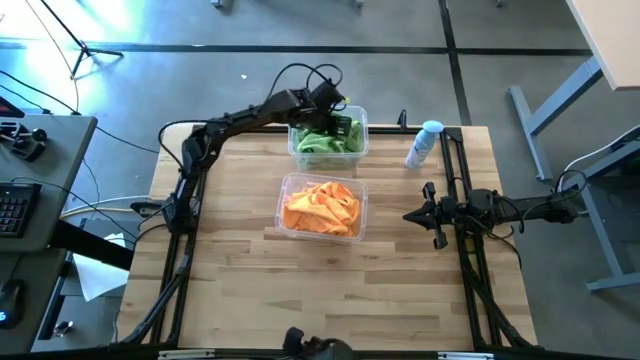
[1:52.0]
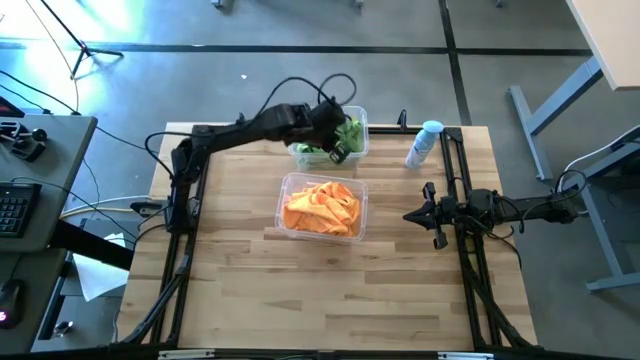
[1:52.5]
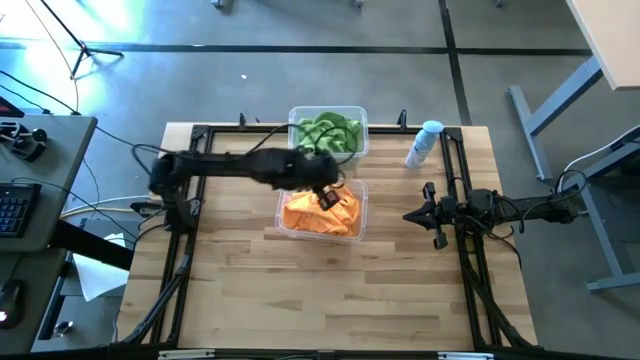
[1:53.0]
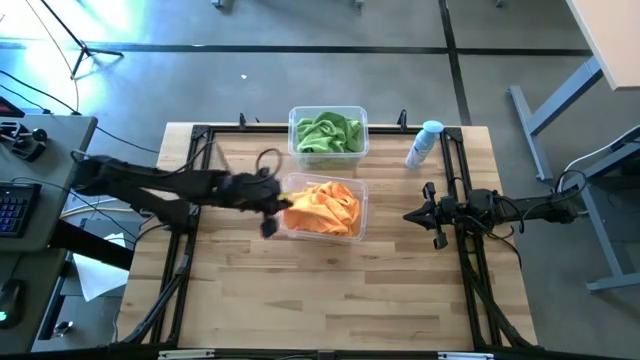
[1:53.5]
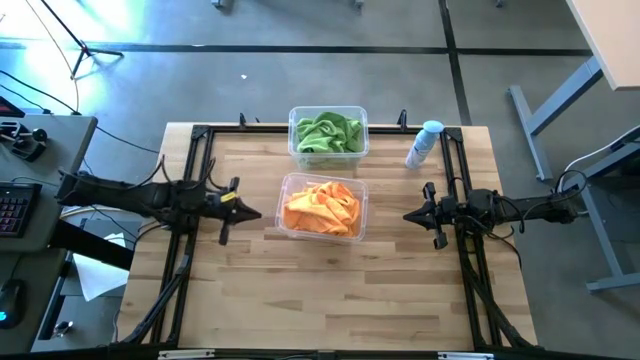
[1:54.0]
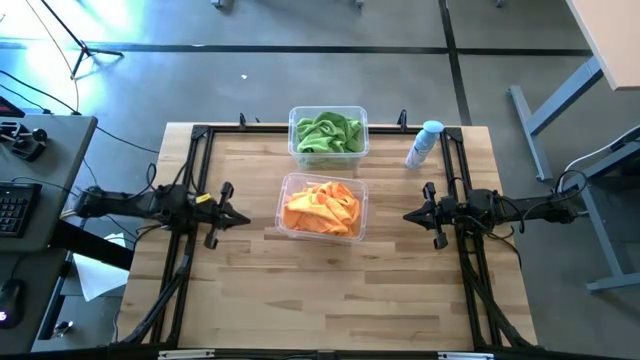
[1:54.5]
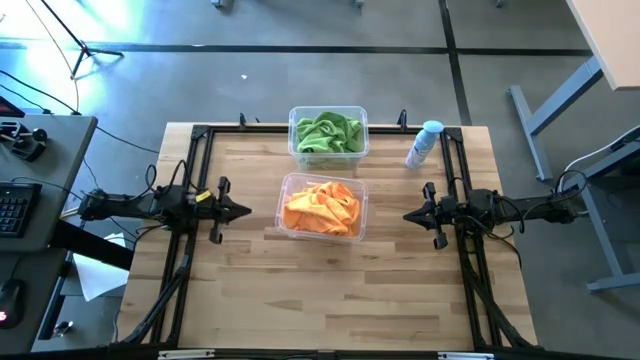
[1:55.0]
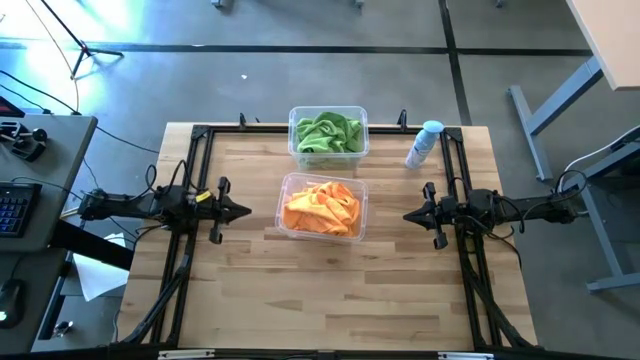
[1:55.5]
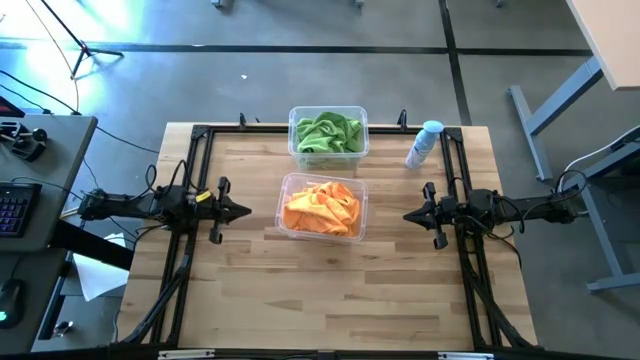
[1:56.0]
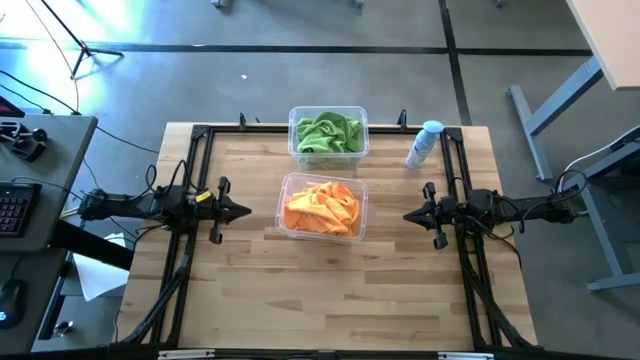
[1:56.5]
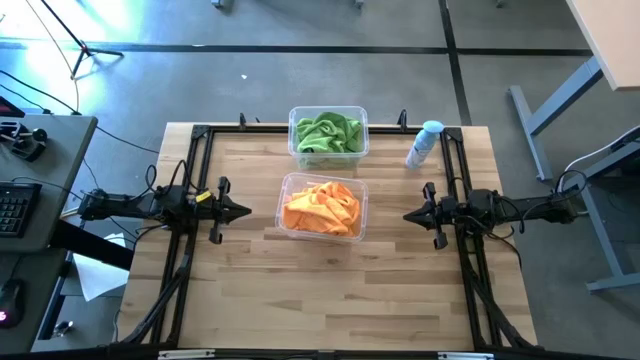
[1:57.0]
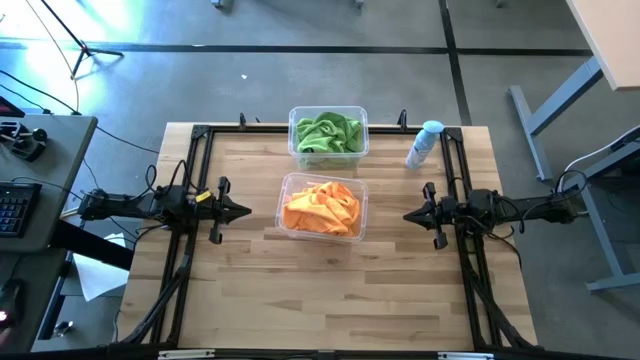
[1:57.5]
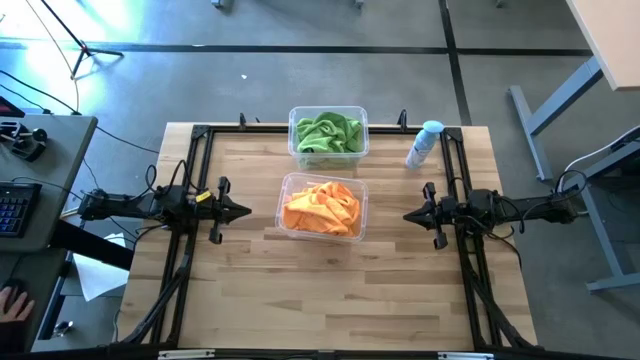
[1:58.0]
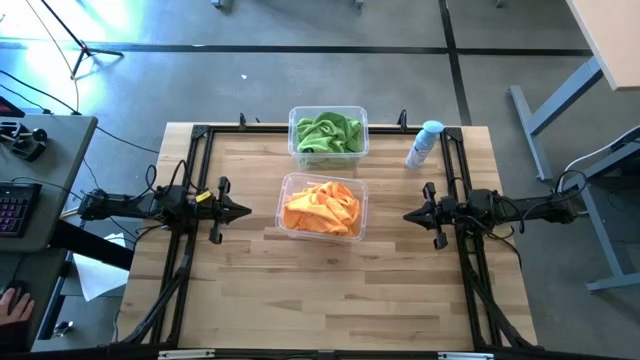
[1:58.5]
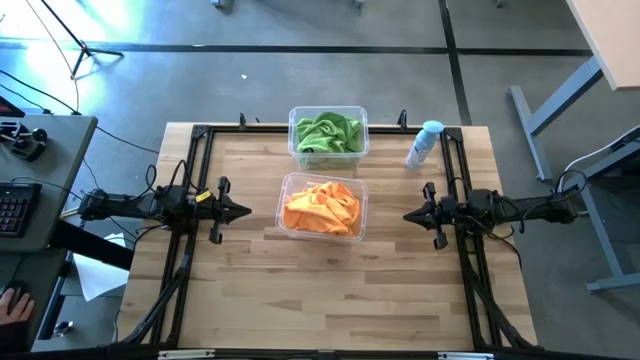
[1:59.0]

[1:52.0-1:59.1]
Task: Sort microfiber towel by color & place in baskets
Return to Home Position

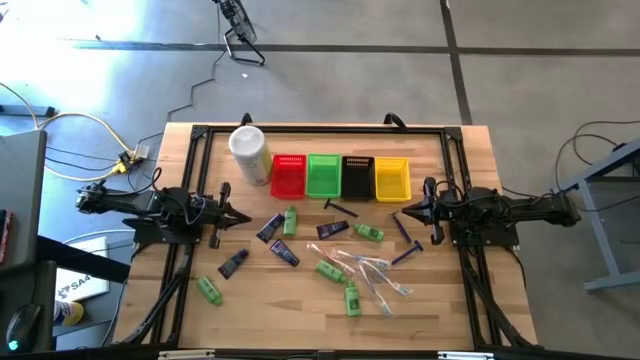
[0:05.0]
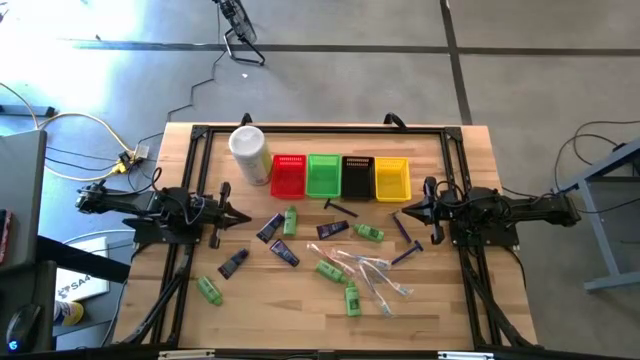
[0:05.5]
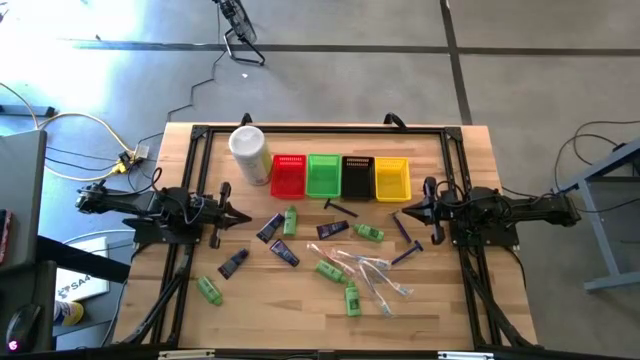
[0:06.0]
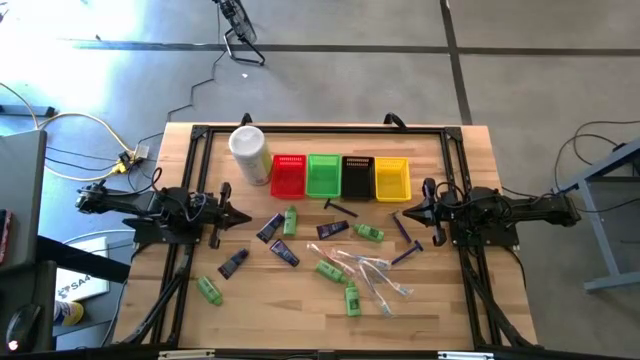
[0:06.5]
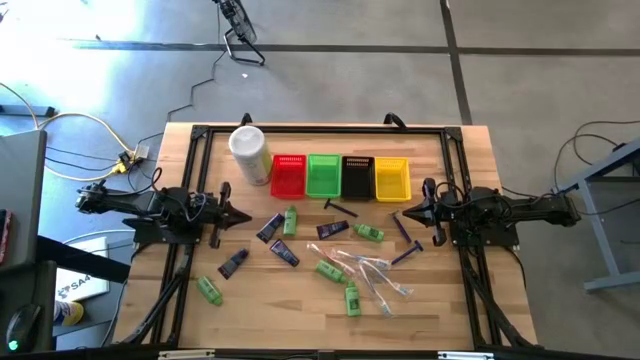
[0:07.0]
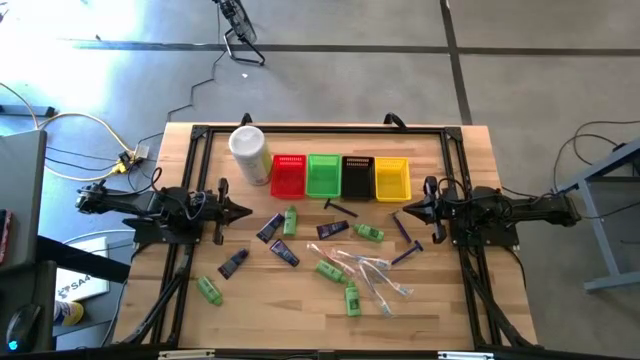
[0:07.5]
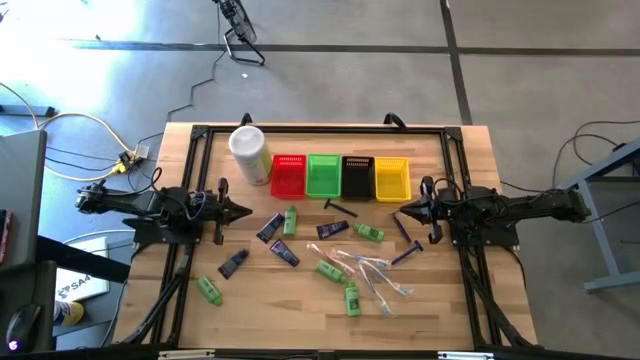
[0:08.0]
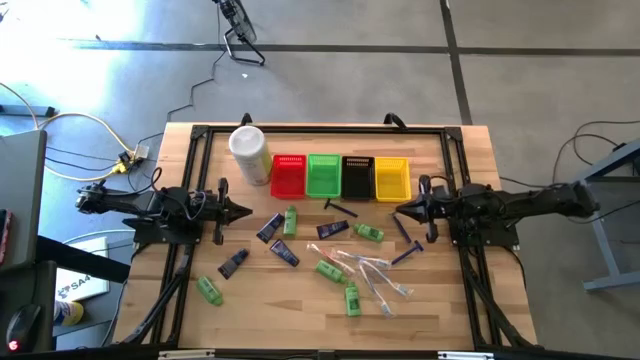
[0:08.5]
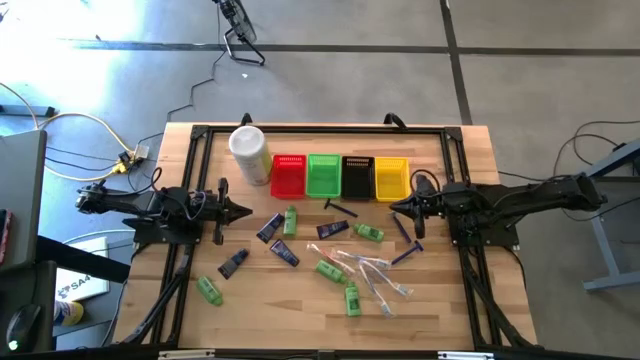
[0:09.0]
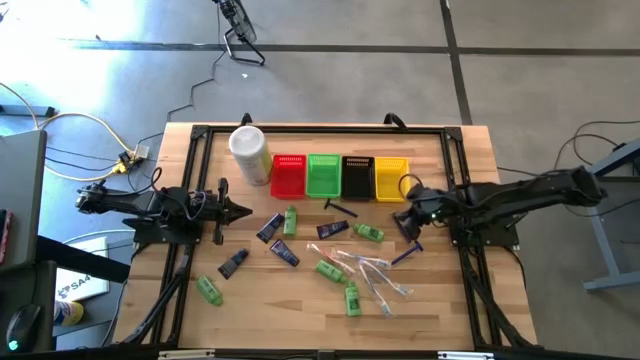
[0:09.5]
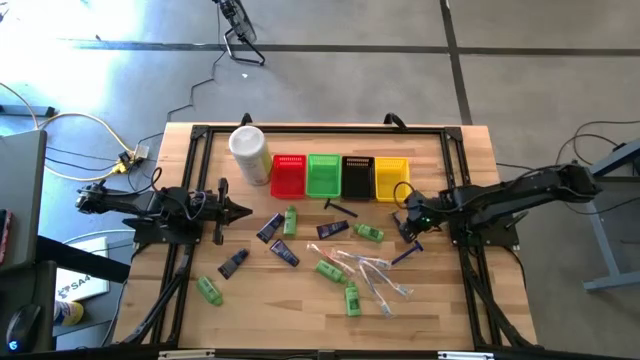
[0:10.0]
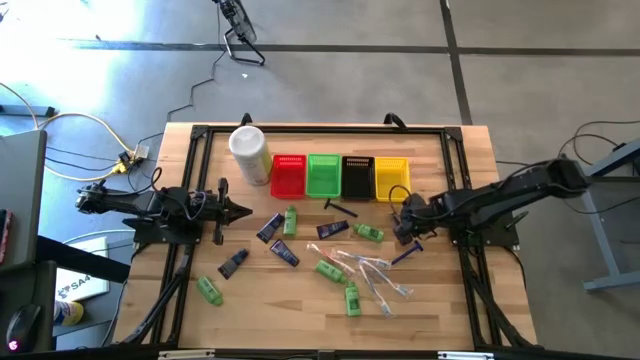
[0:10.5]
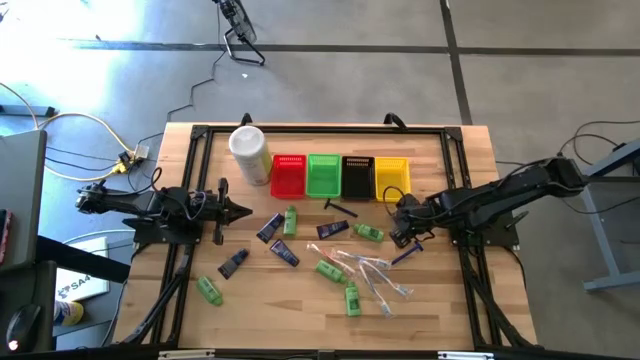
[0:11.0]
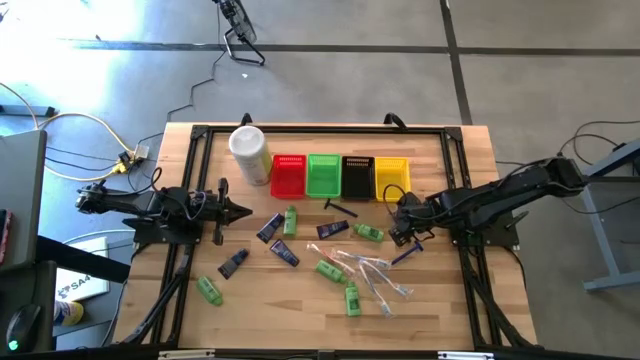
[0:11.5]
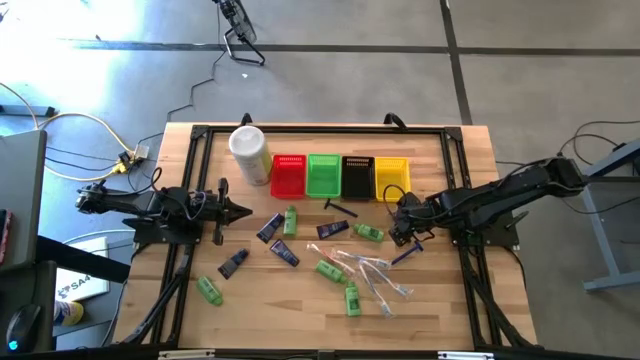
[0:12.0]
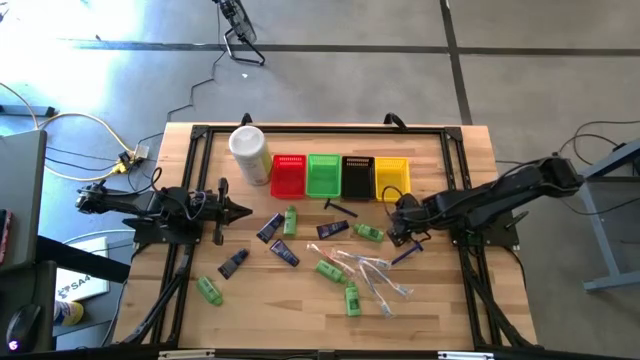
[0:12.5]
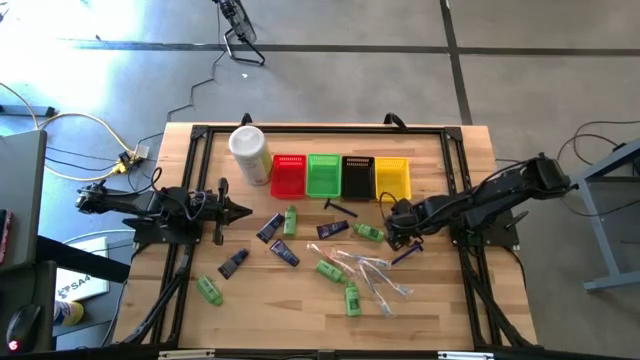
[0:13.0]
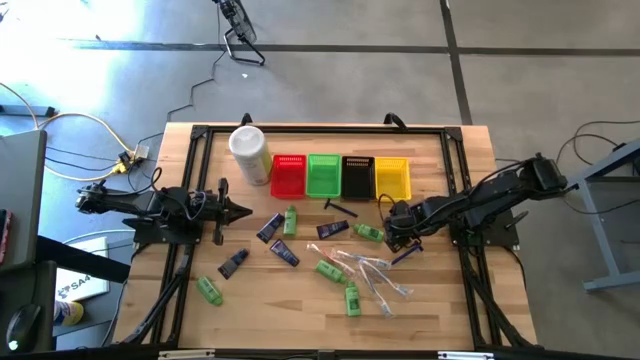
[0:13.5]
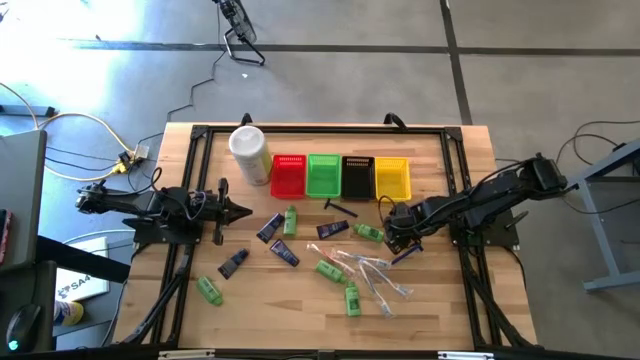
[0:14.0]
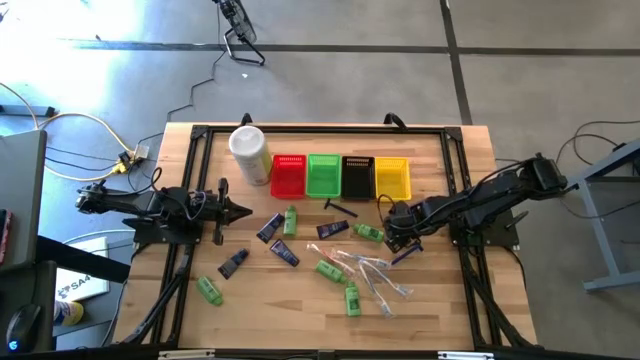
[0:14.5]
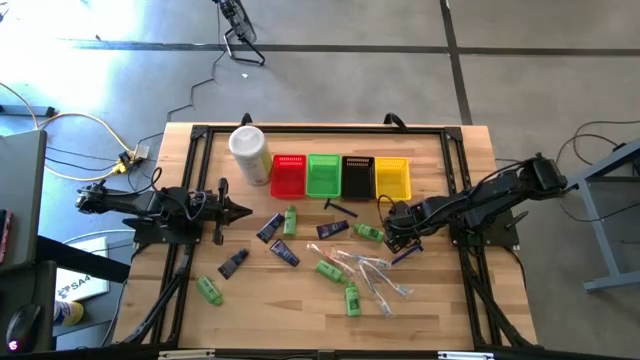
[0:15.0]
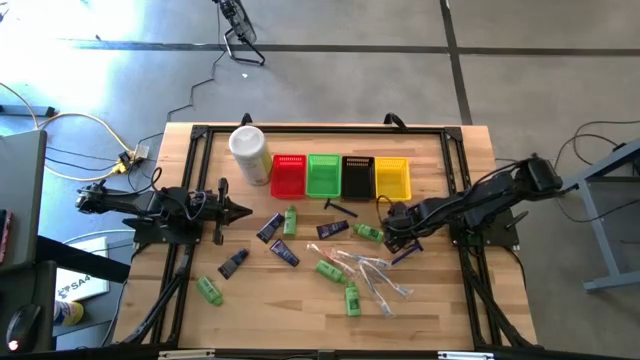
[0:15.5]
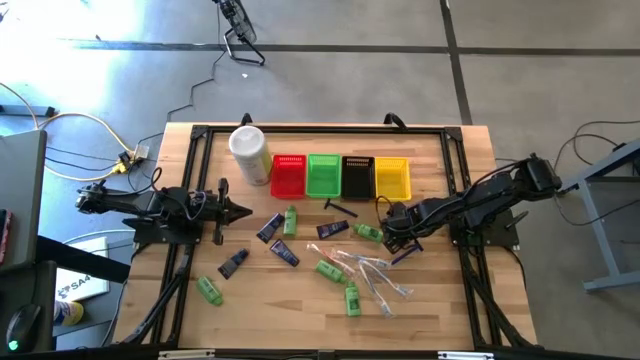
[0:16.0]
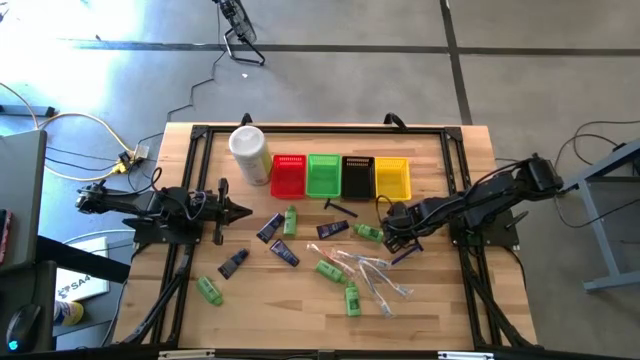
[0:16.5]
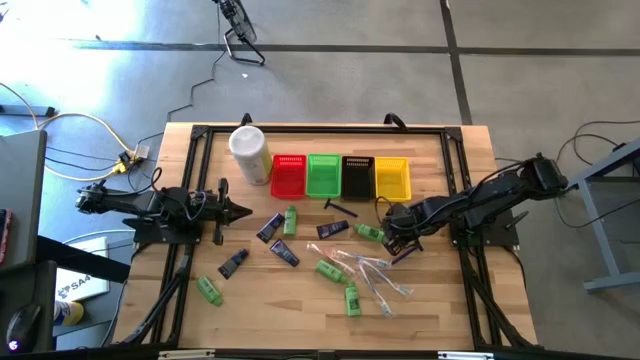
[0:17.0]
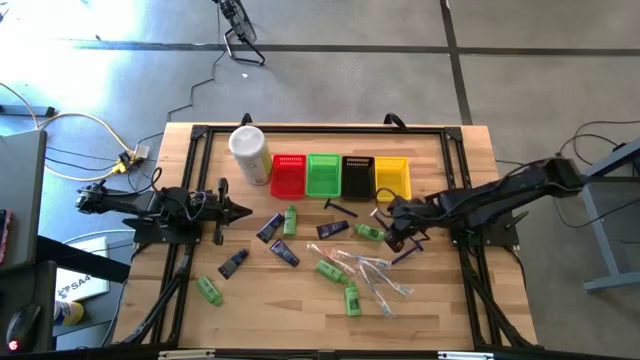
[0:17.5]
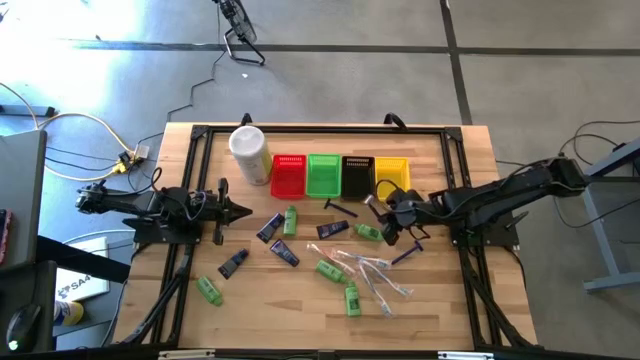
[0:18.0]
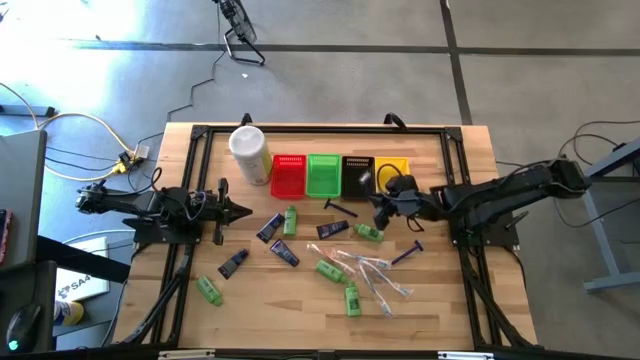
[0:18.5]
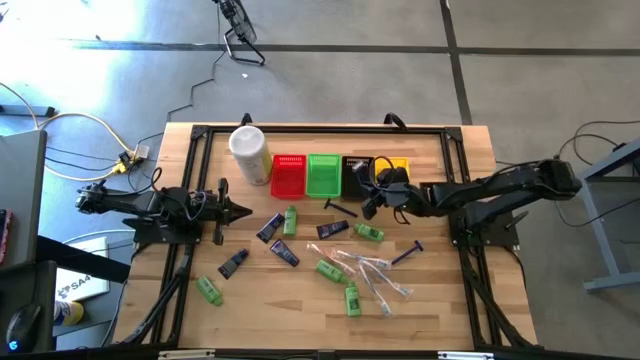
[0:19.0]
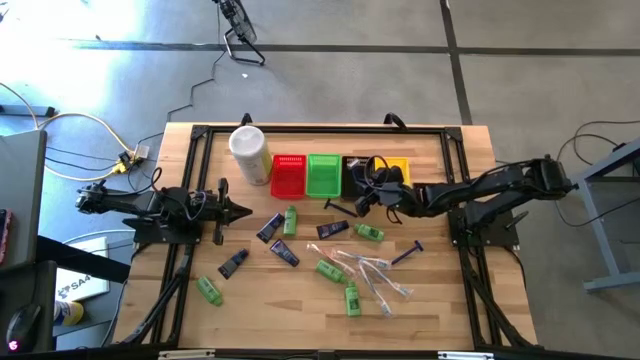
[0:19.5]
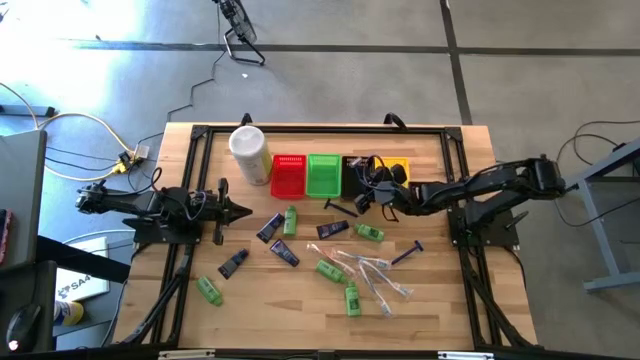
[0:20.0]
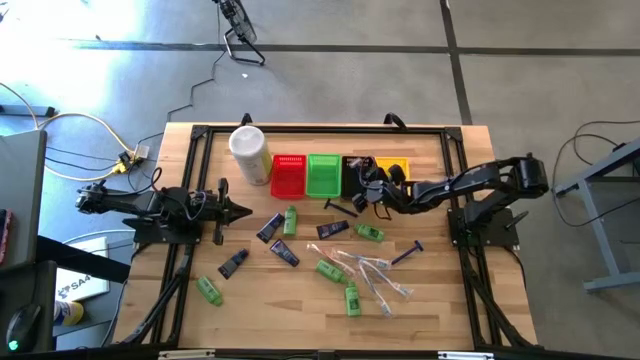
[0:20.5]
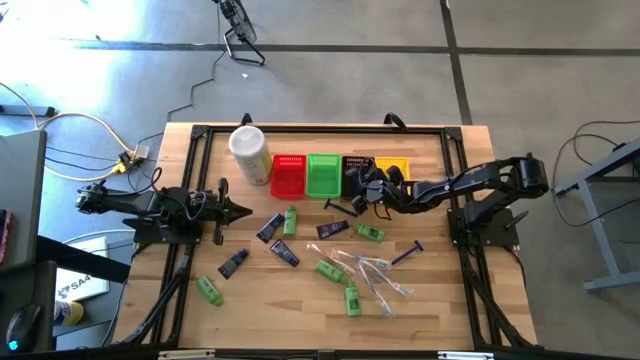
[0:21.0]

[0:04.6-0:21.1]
Task: Pick & Place Travel size toiletries
Put the blue razor into the black bin
